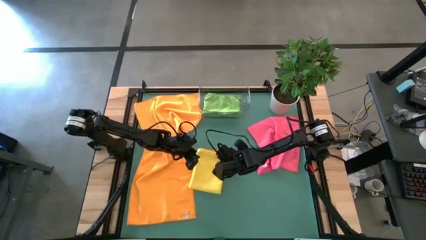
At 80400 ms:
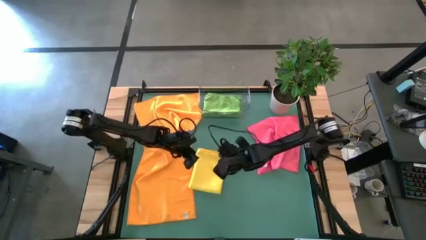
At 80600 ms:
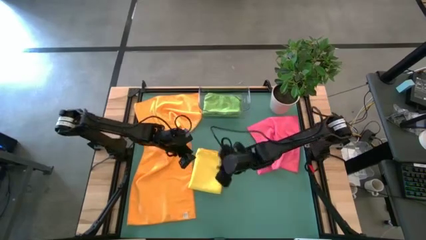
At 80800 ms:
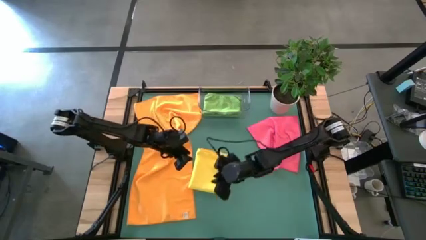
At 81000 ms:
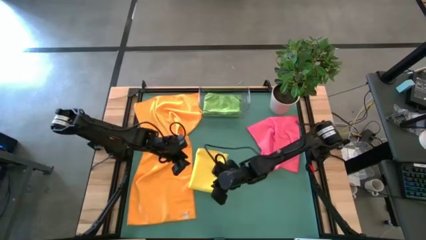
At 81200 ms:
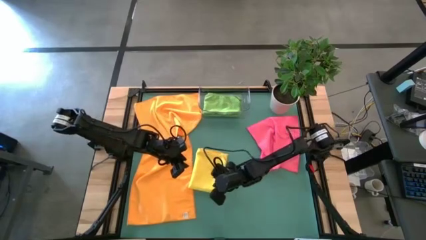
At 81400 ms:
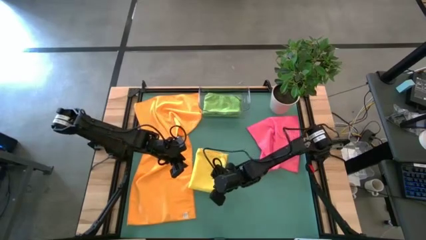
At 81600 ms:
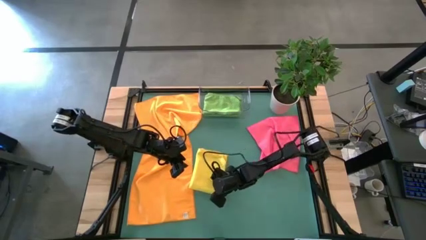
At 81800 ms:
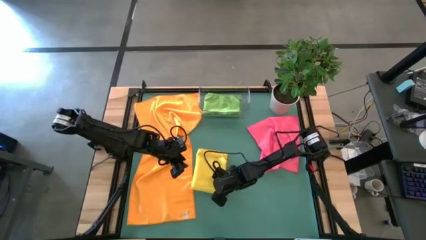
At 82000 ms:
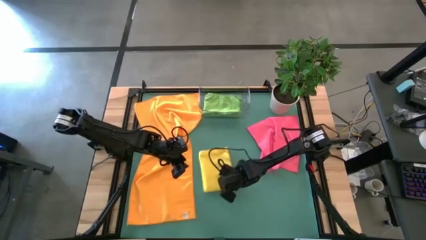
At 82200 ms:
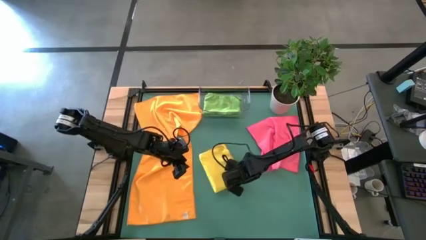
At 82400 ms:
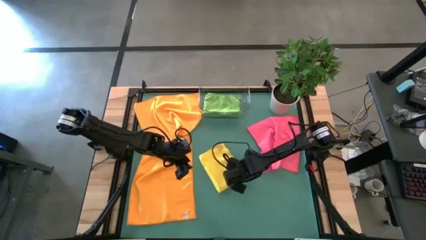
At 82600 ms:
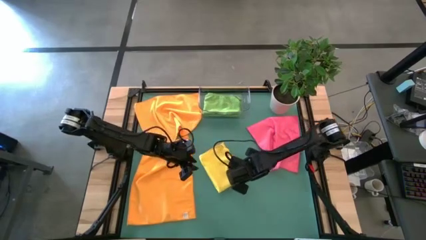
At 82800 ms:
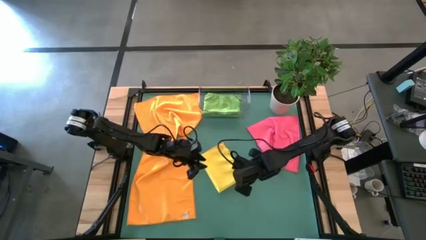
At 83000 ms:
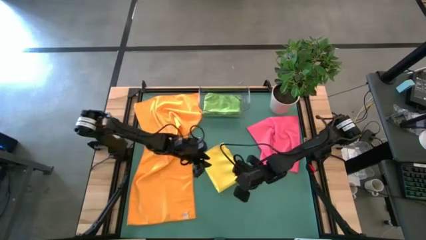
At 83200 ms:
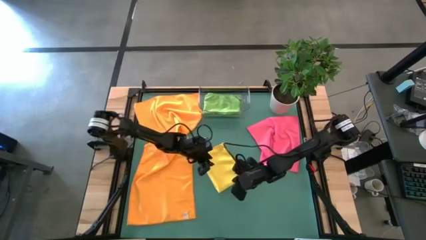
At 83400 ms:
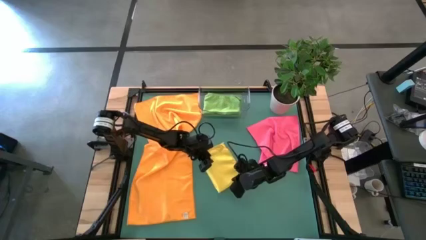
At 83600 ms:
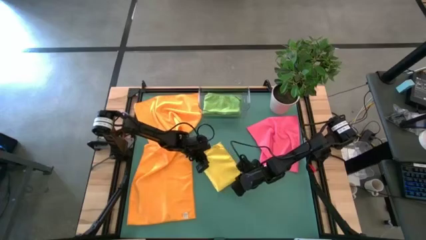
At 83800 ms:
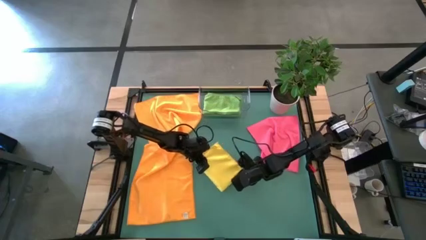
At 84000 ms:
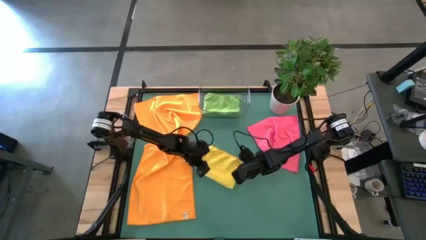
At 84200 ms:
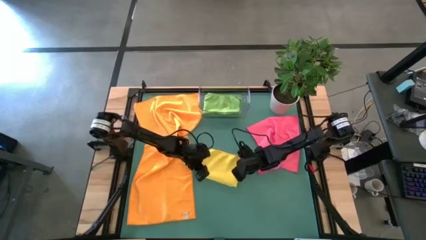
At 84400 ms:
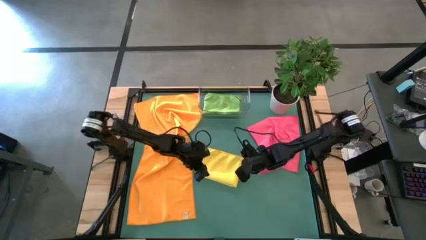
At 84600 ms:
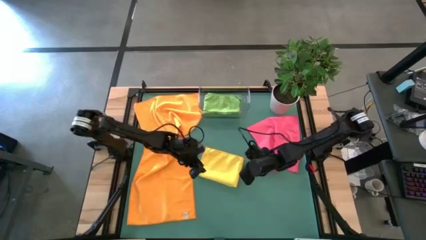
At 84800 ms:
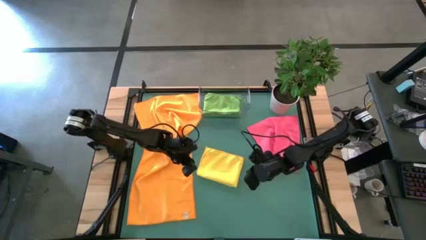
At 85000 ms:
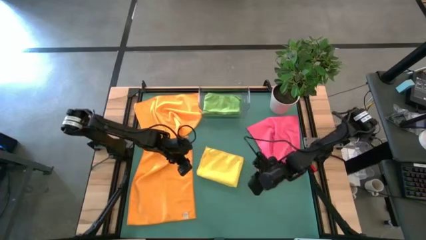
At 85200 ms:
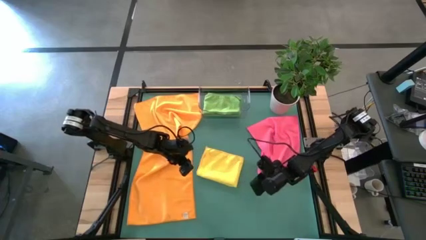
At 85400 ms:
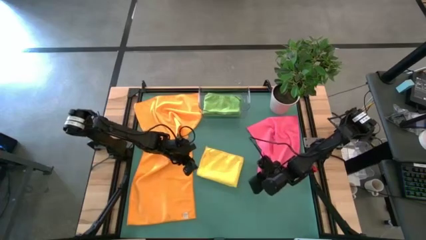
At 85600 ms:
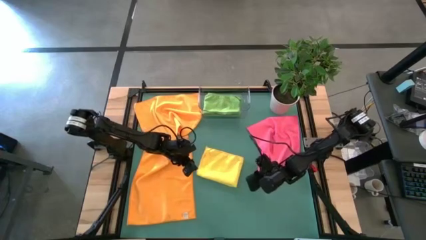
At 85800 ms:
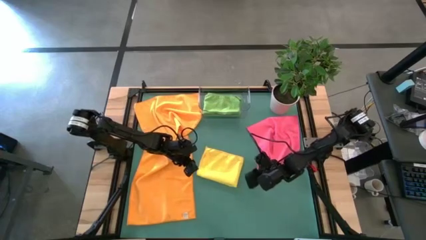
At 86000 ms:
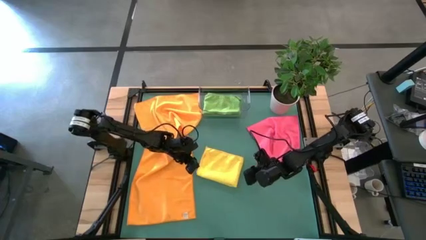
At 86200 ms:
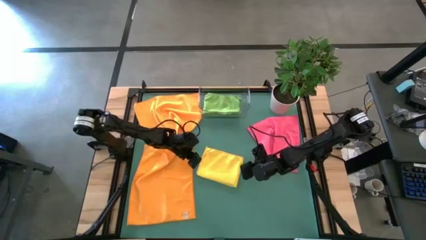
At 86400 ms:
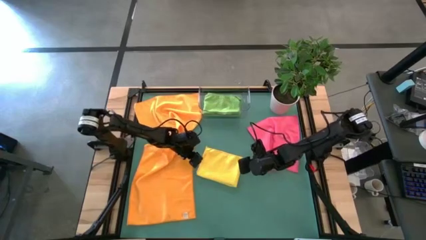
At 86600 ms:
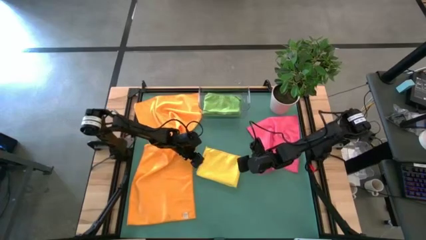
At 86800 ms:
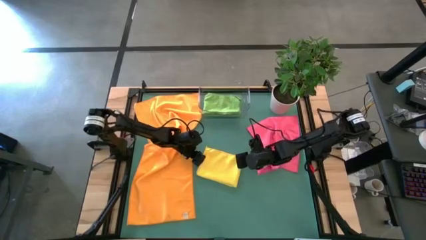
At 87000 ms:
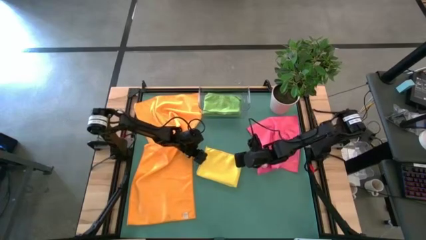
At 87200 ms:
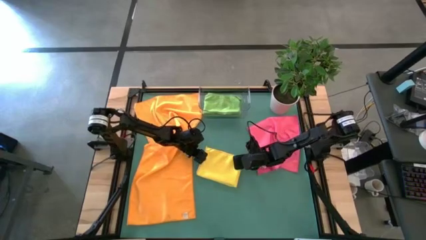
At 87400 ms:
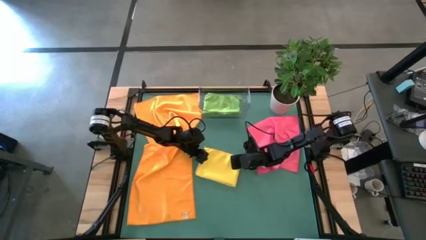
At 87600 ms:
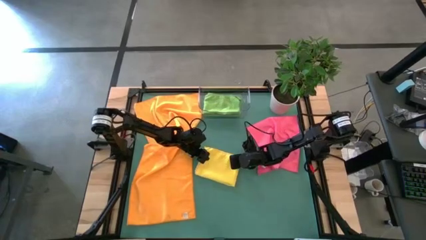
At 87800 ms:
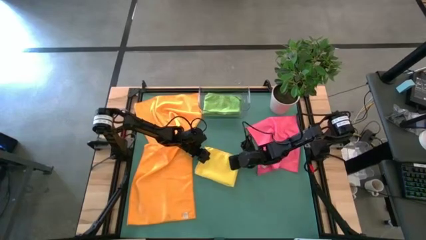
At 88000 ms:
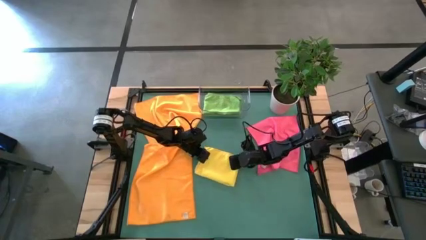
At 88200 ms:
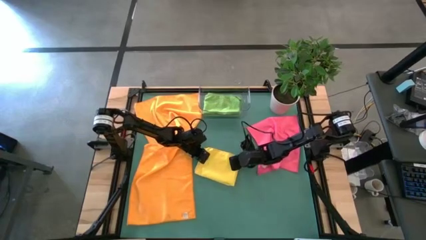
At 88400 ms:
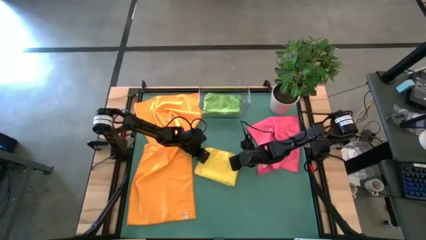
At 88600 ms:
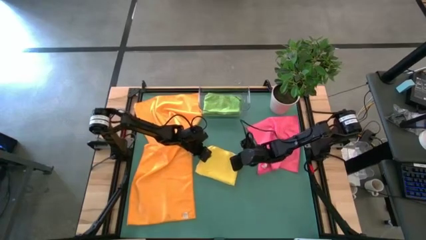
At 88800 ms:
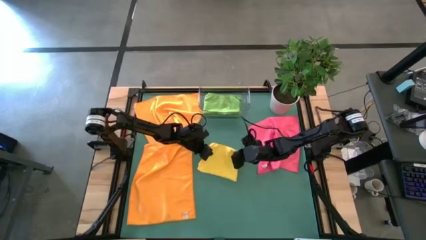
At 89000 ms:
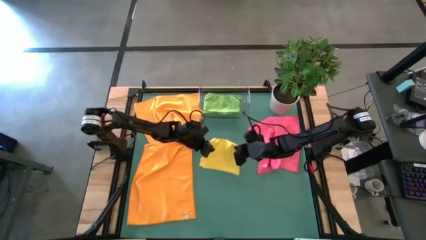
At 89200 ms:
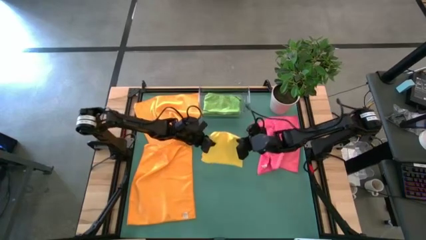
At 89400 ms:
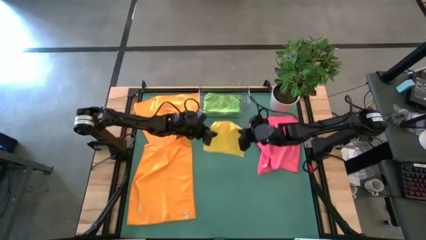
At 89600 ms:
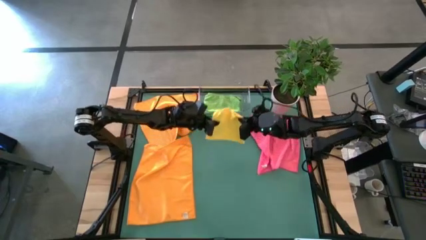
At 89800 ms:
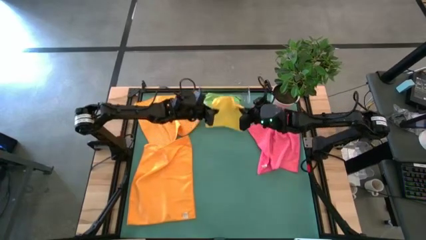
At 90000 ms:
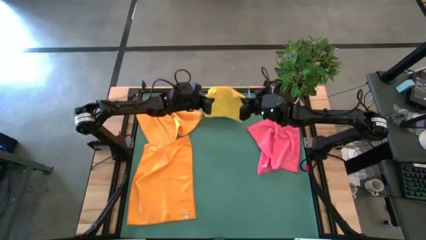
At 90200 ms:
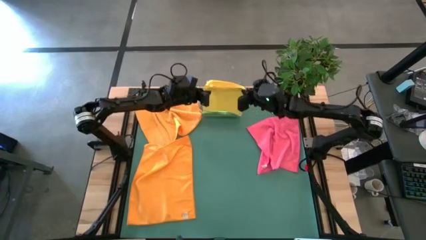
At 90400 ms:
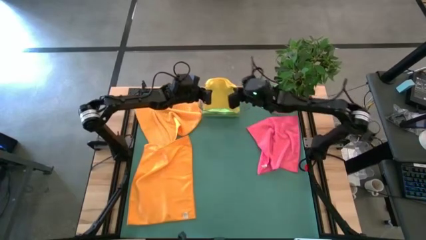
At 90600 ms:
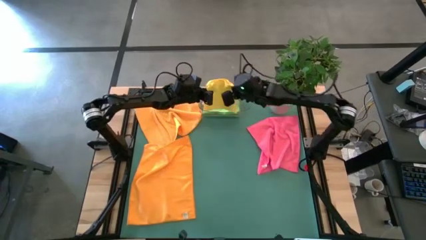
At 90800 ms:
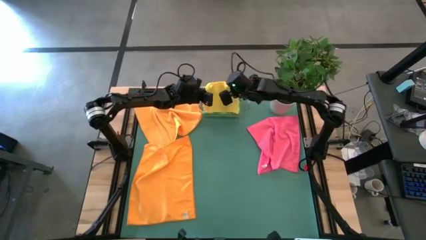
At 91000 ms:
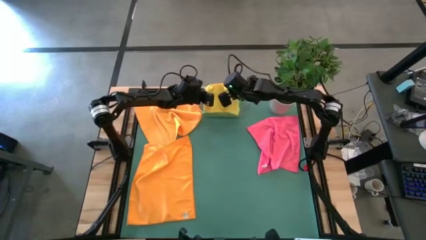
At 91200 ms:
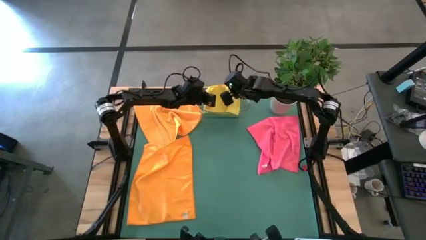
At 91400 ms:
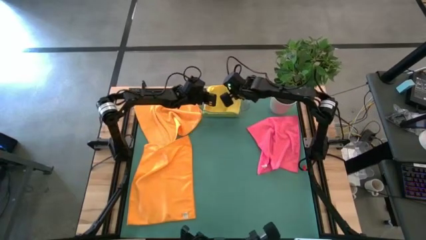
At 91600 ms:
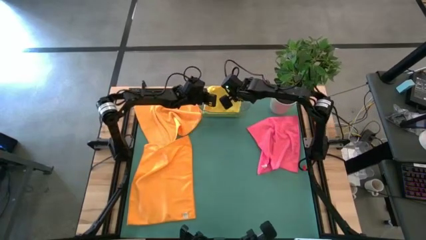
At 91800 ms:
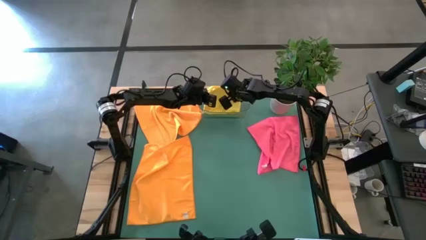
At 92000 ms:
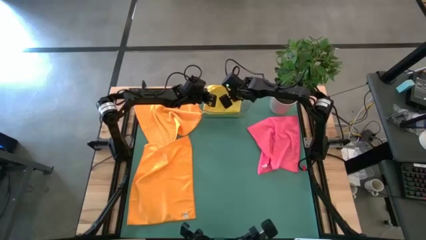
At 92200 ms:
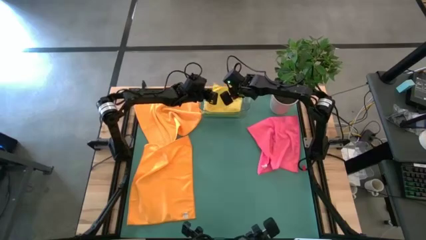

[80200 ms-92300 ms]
Task: Fold microfiber towels
Put the folded yellow towel into the transparent bin

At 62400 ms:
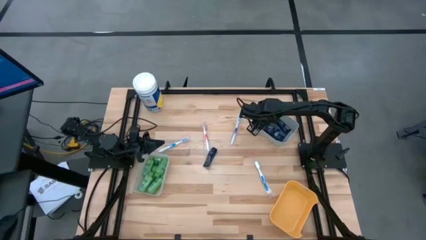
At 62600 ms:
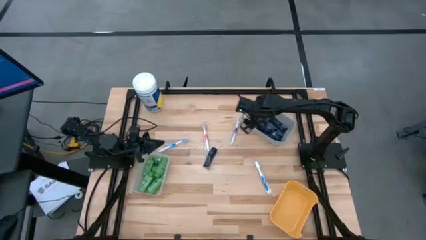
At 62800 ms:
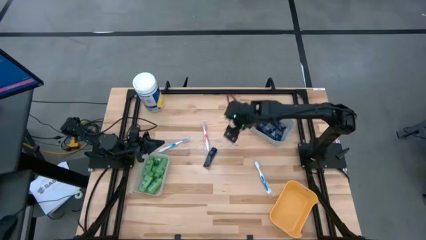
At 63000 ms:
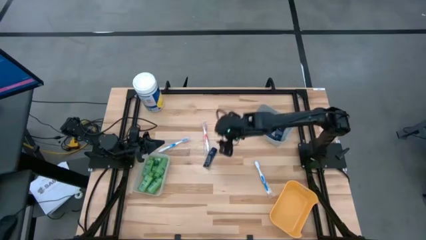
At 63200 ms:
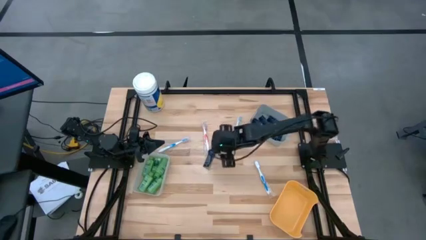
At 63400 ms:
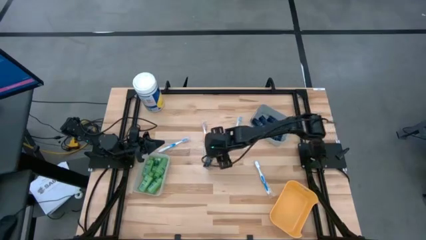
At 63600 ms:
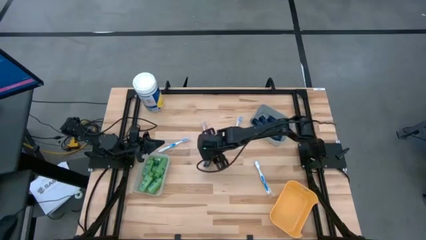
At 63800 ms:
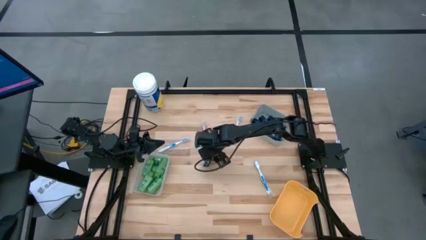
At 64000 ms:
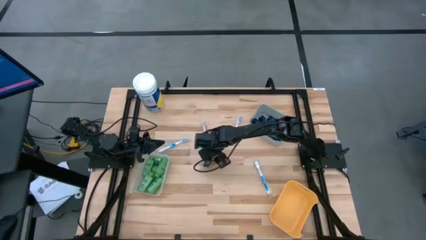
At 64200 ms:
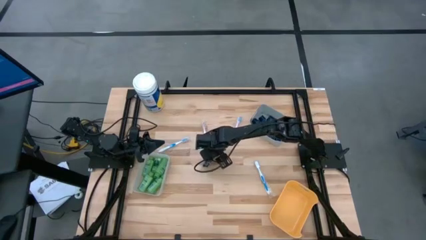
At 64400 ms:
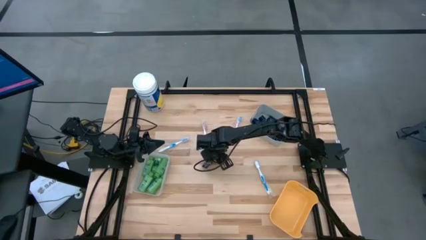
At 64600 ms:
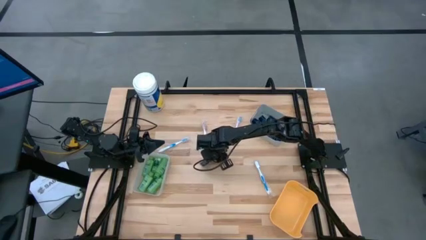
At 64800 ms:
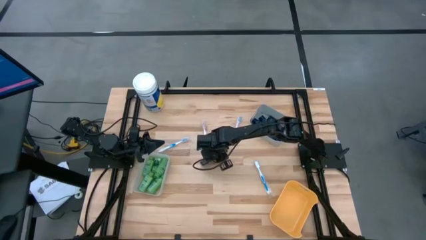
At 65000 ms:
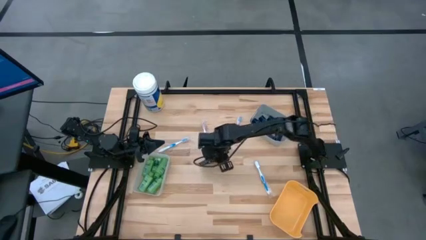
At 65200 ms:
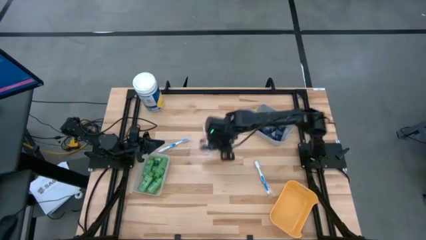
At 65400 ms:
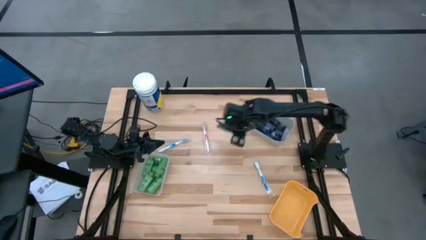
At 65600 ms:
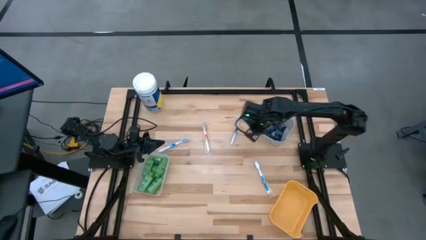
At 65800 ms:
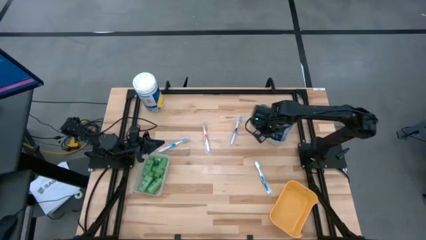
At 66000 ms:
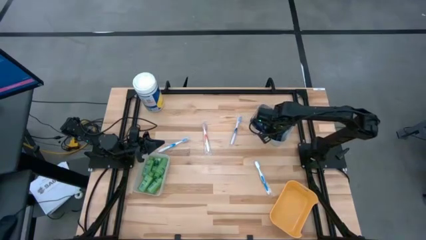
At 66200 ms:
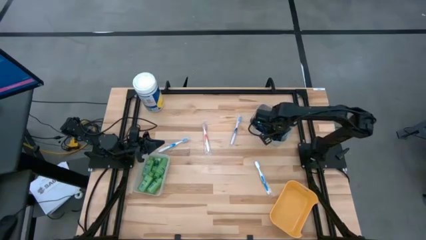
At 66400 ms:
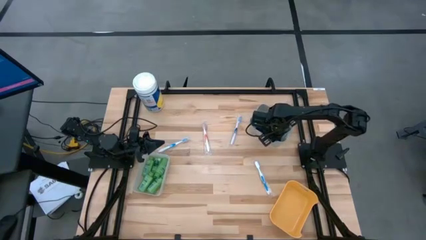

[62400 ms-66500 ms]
Task: Pick & Place Travel size toiletries
Put the blue shave cream tube into the gray bin
